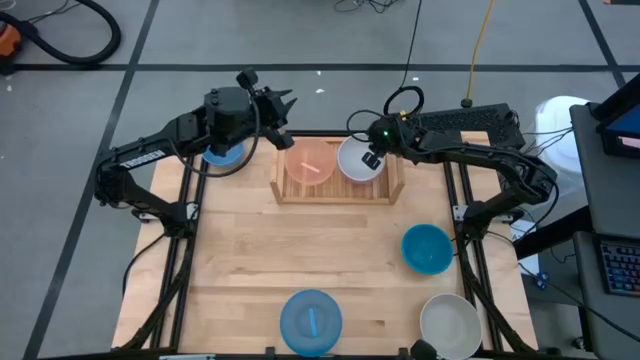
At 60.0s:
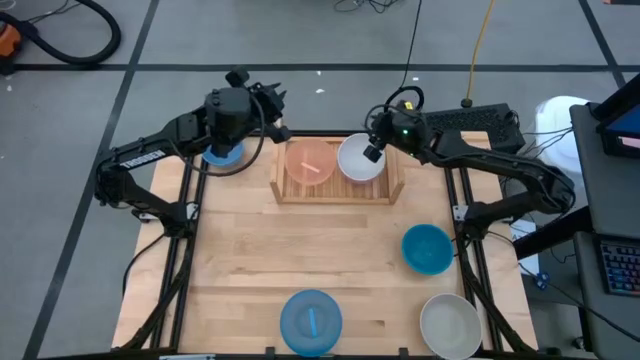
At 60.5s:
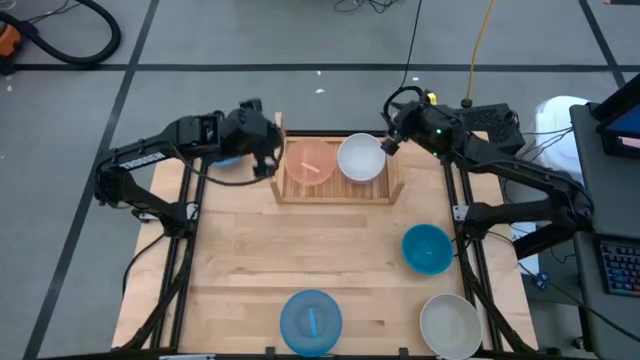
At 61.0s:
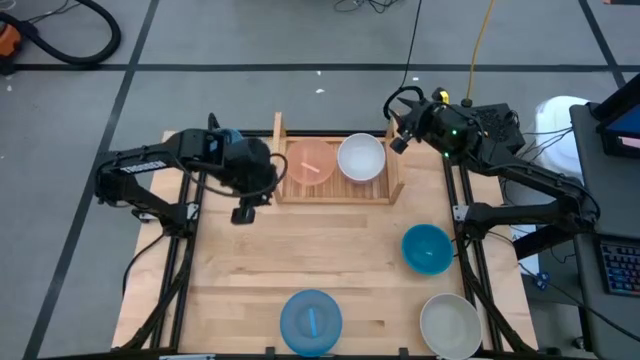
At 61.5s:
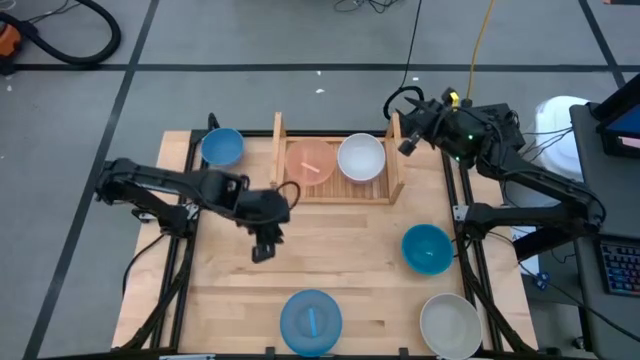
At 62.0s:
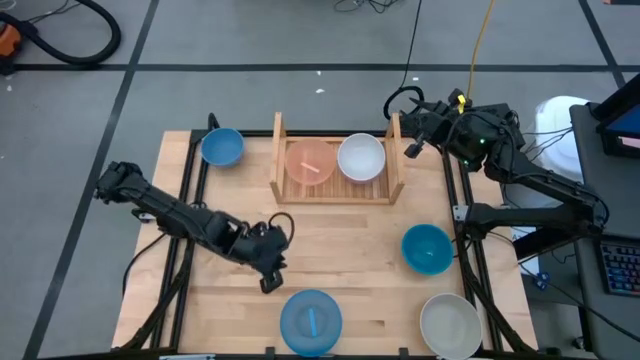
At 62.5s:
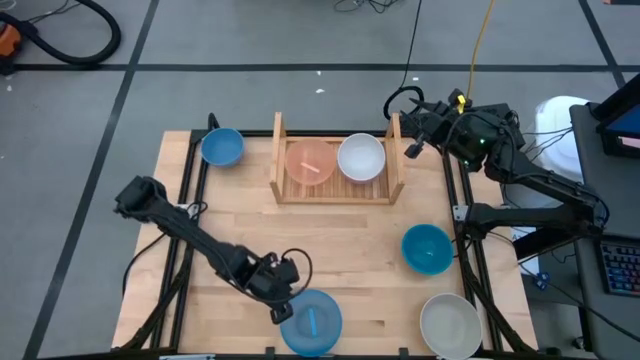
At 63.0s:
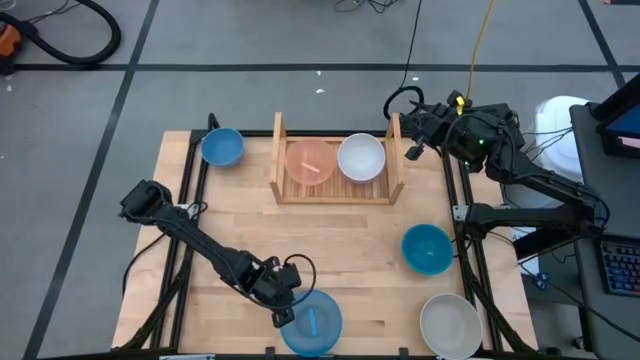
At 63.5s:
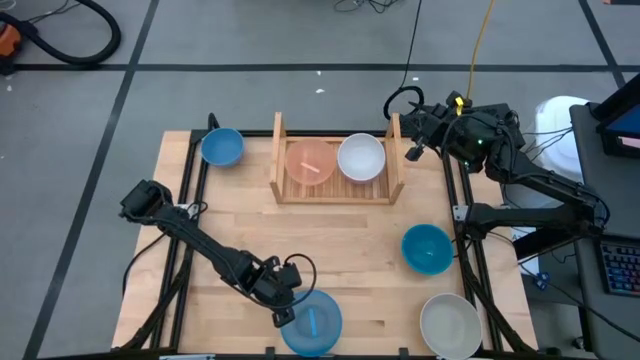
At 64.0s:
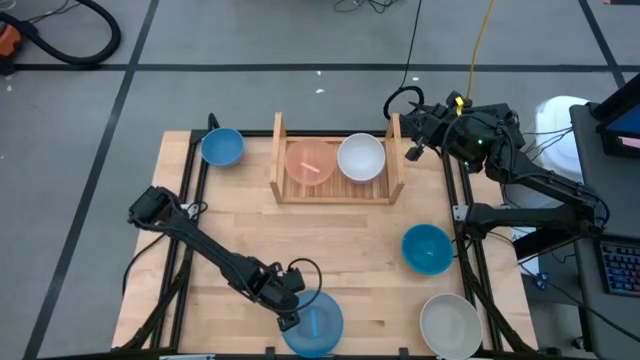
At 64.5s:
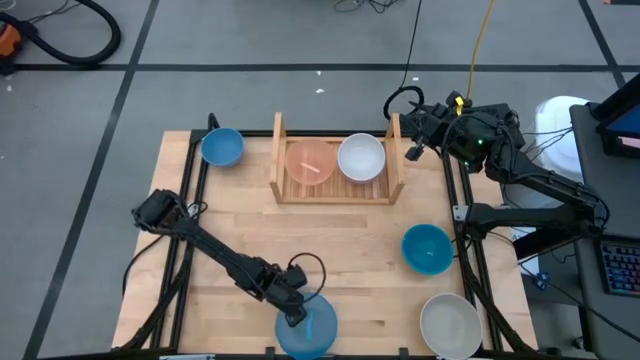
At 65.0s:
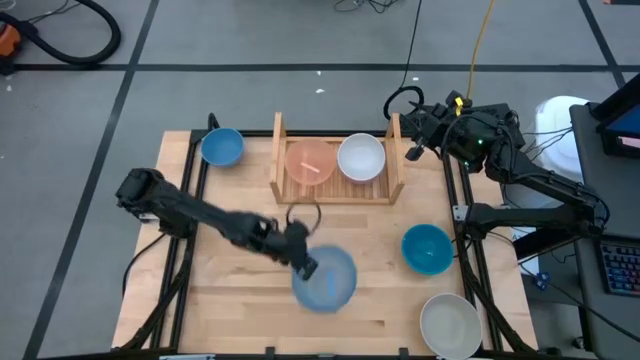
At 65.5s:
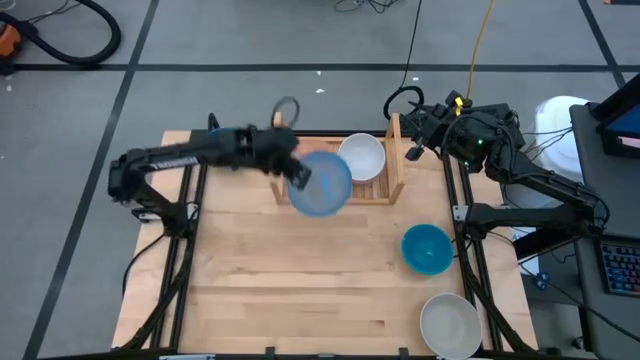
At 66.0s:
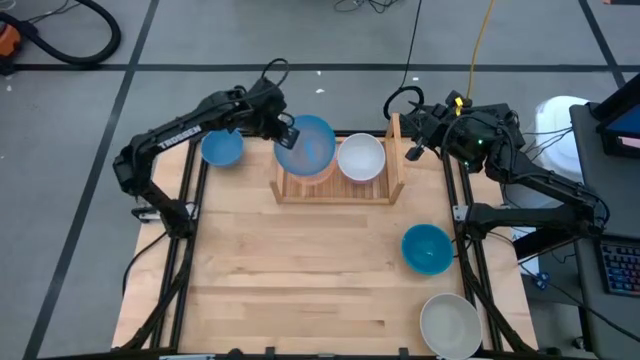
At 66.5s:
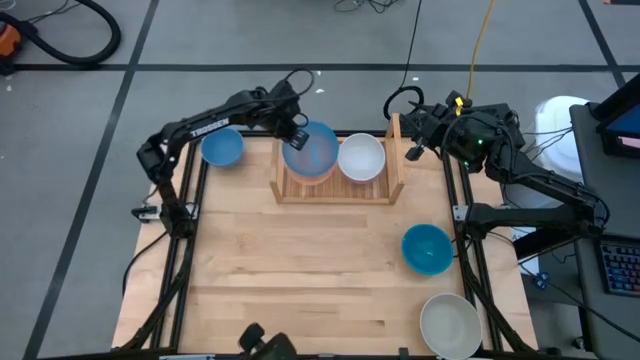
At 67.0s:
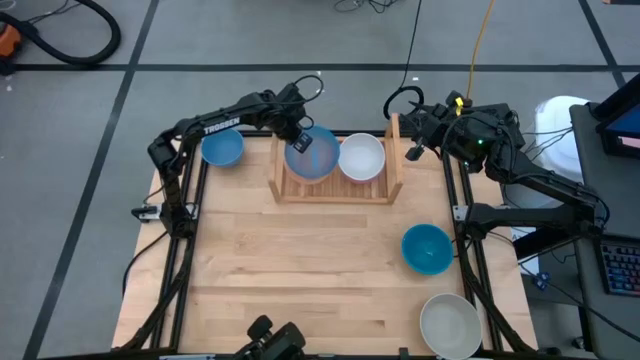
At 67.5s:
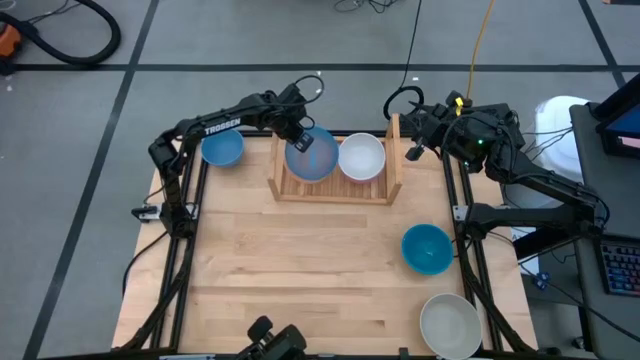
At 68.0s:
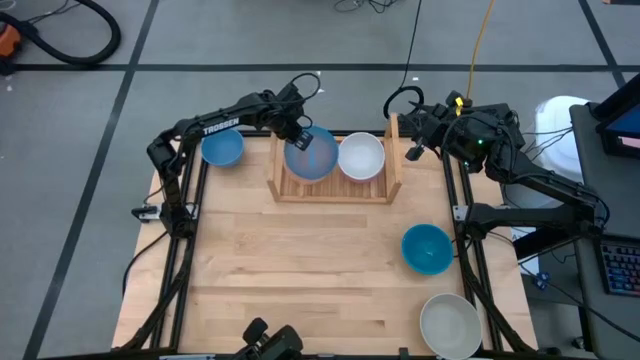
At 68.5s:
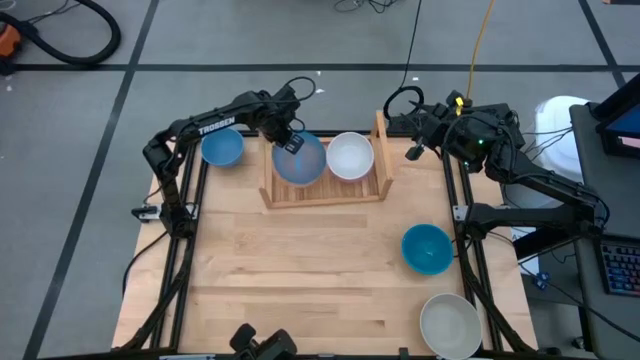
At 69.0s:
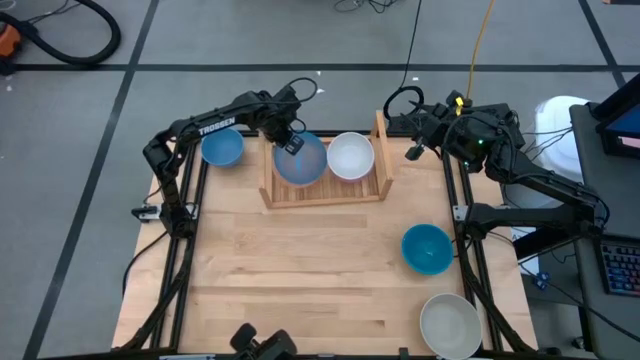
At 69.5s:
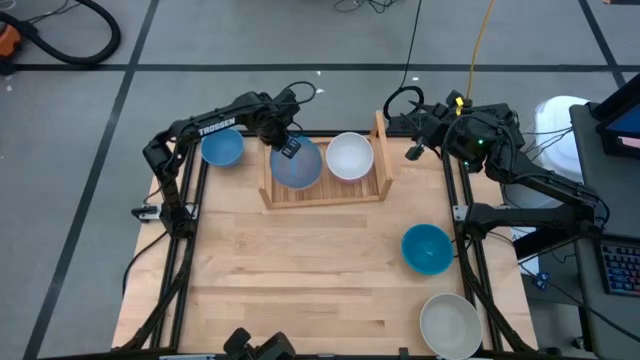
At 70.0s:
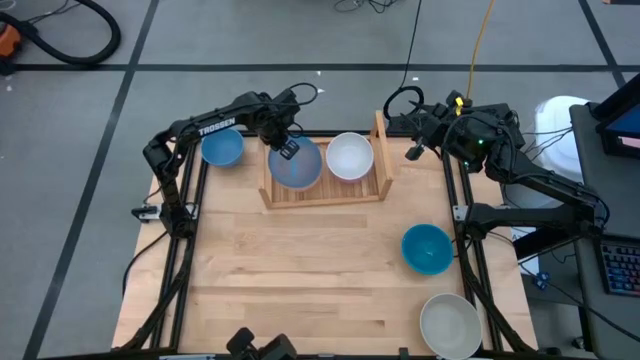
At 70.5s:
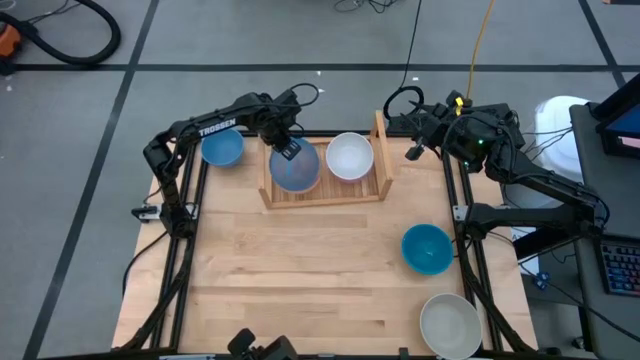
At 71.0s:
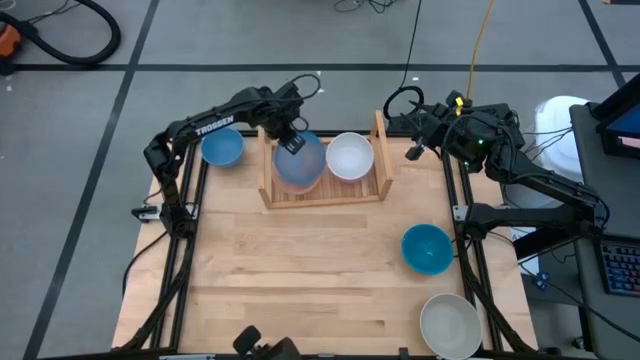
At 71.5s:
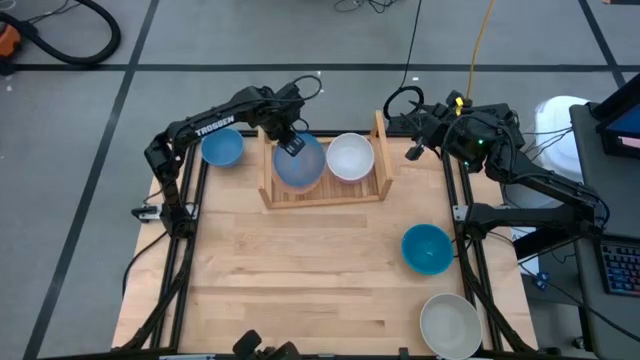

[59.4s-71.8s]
Task: Place and stack bowls onto a shelf
Stack the bottom blue bowl on top of the orange bowl on the shelf

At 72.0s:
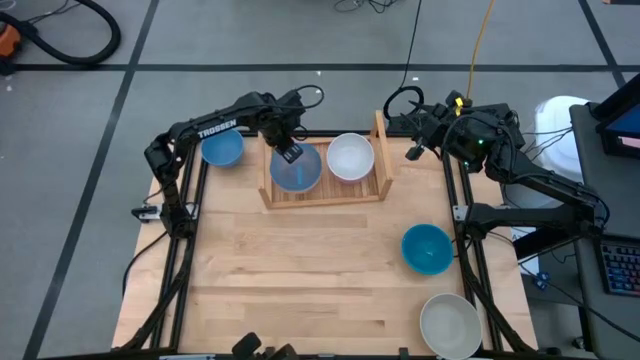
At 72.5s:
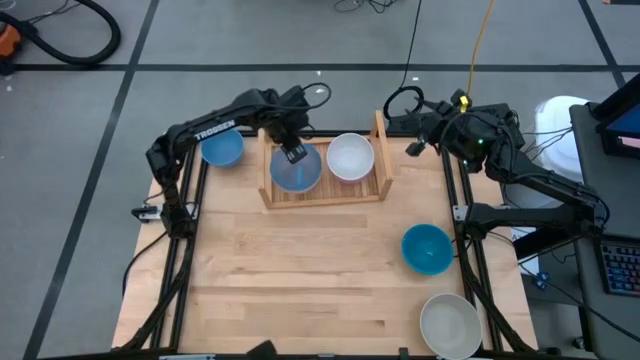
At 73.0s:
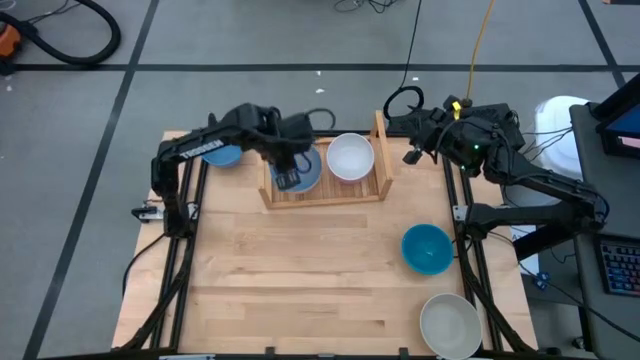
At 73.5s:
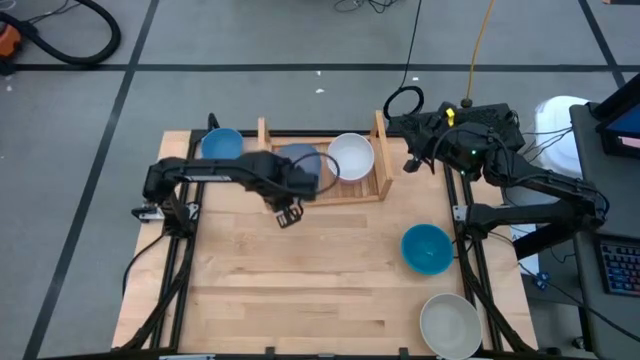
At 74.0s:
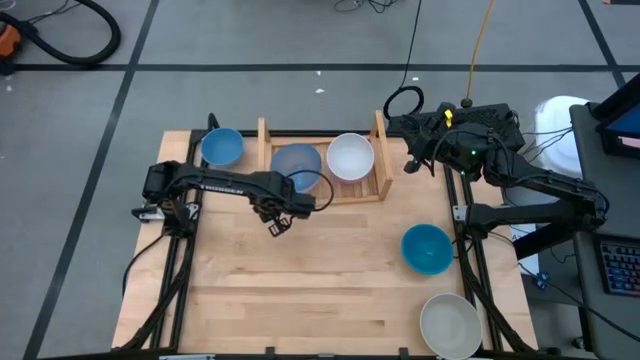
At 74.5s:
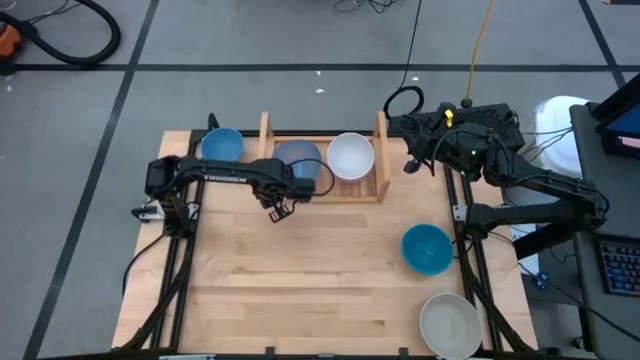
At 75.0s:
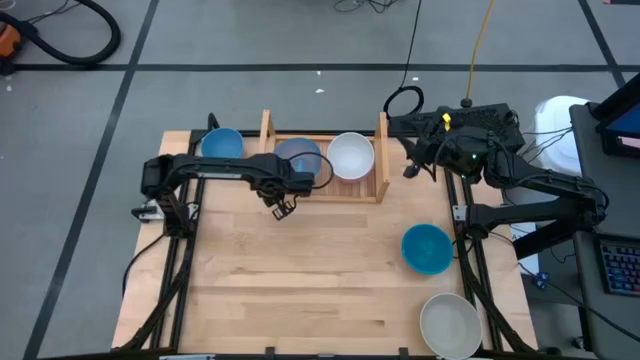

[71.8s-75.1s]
Adjust the shelf on the table

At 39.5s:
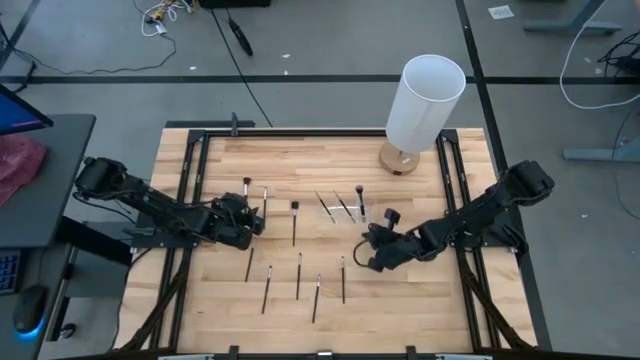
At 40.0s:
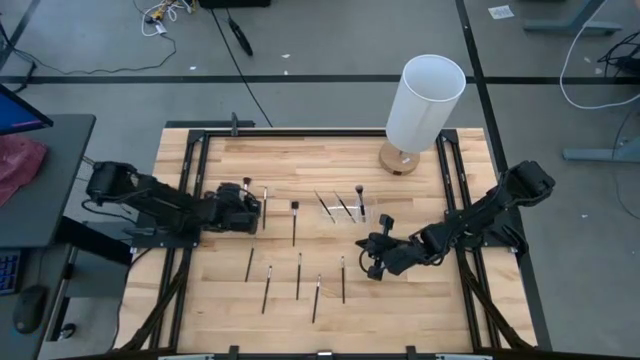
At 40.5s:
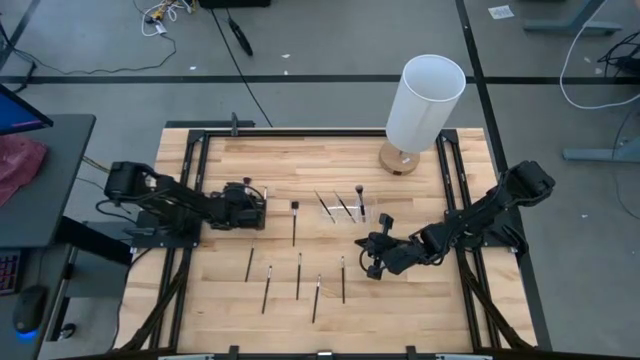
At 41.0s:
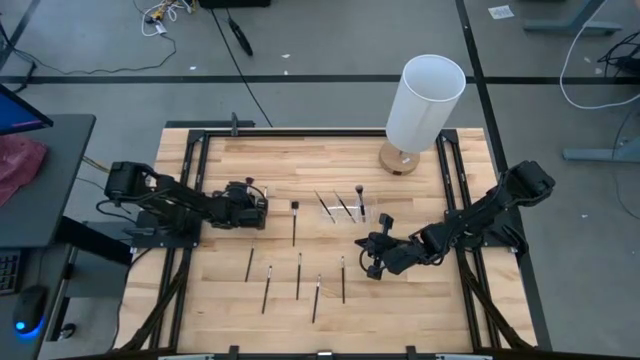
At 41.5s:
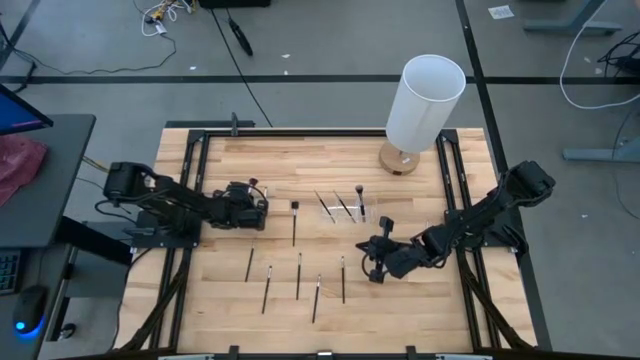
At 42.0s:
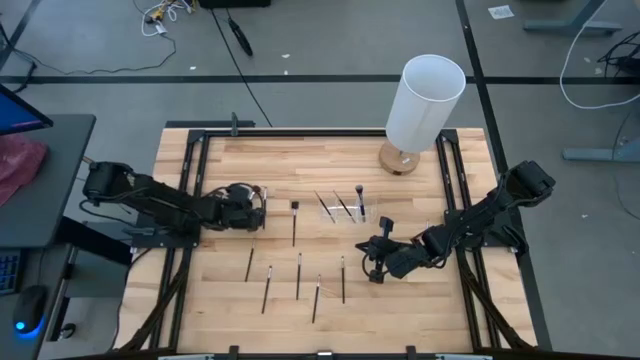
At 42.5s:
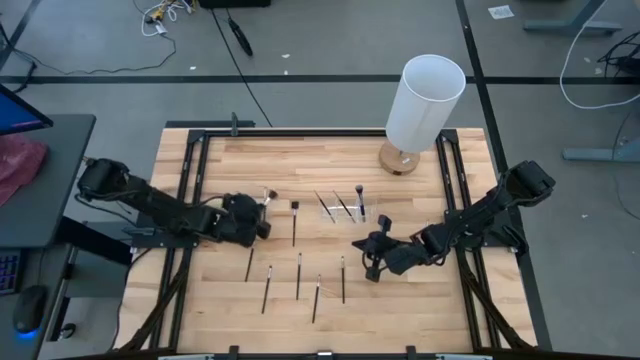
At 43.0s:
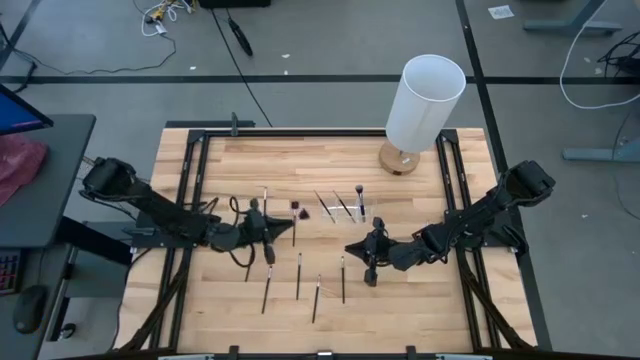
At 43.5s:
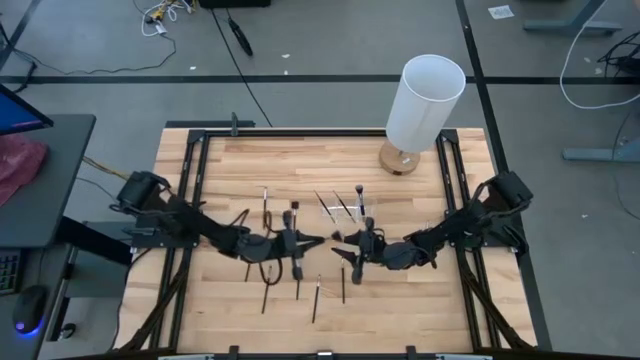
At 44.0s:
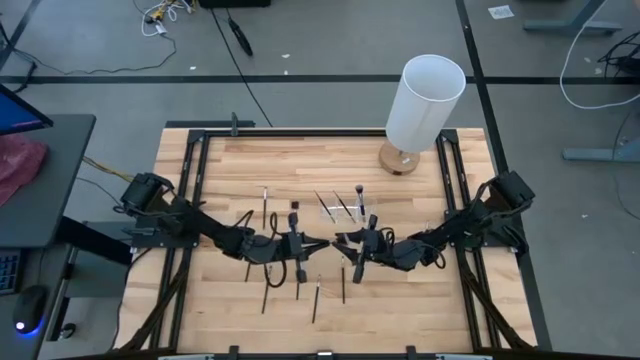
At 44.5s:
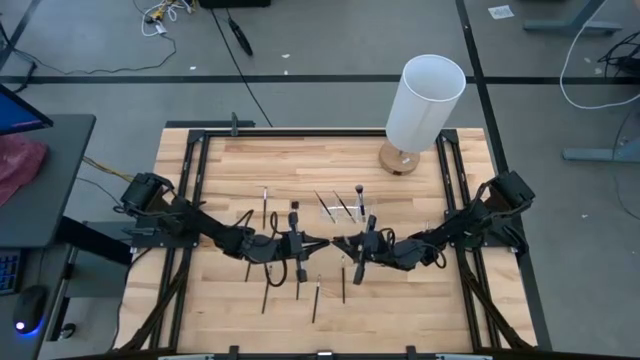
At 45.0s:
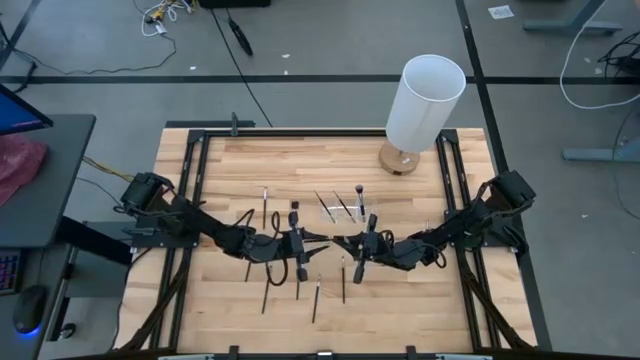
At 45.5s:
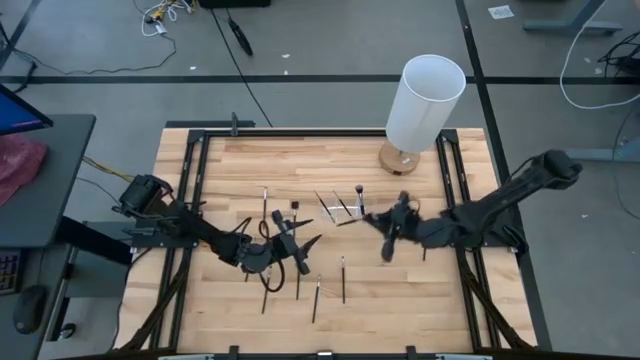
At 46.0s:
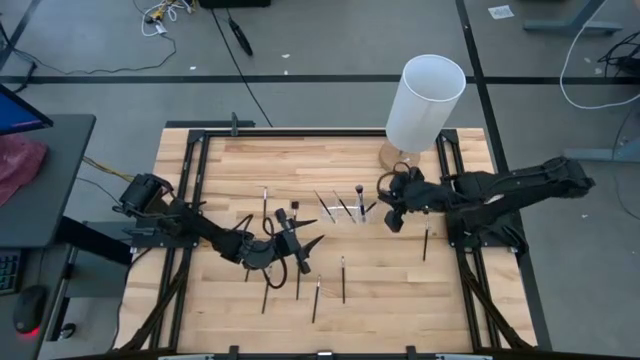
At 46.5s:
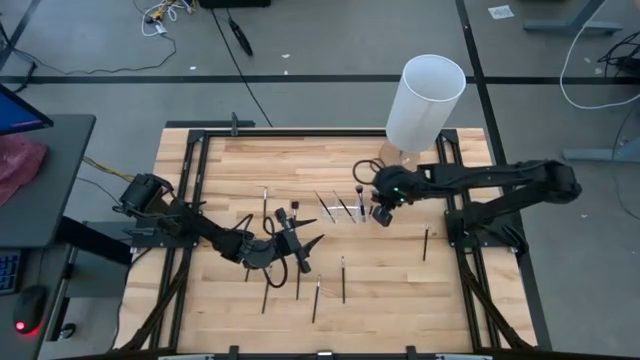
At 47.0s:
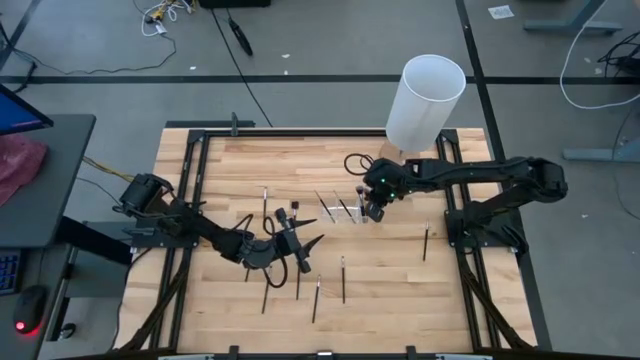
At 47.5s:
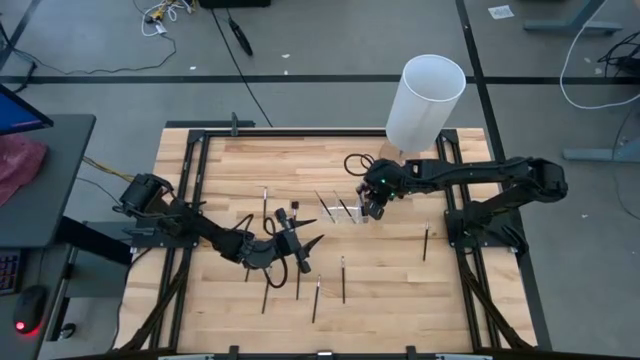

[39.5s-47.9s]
Task: Pick & Place Makeup Supplies
Put the black makeup brush into the transparent organizer
